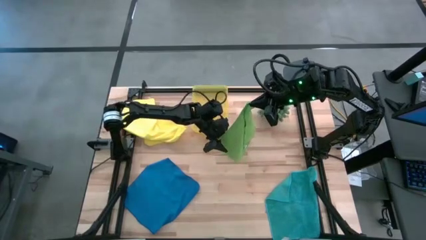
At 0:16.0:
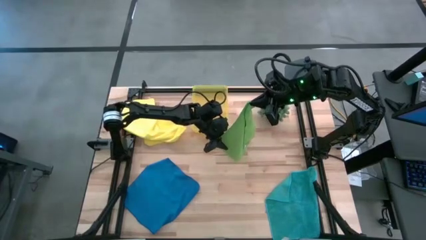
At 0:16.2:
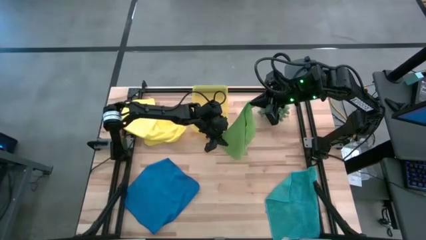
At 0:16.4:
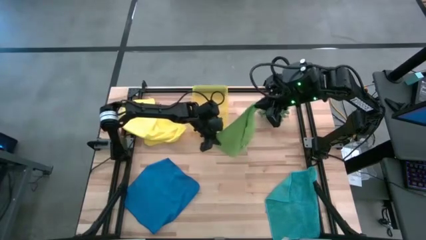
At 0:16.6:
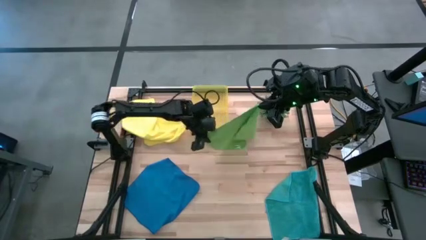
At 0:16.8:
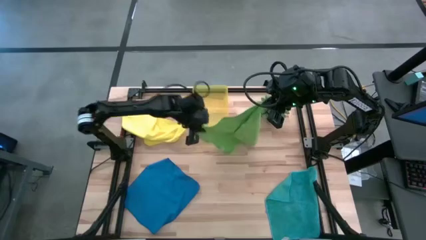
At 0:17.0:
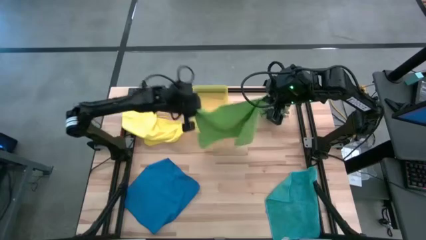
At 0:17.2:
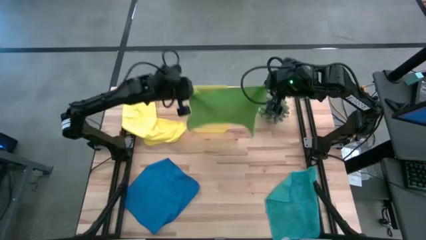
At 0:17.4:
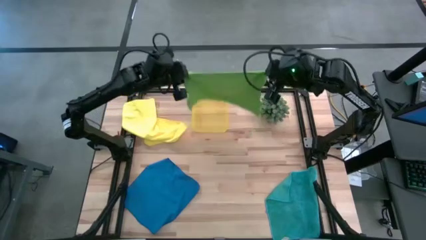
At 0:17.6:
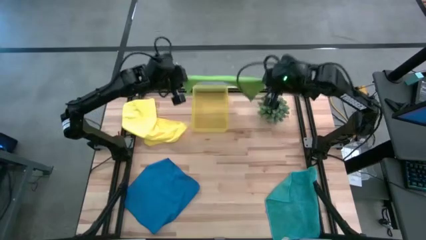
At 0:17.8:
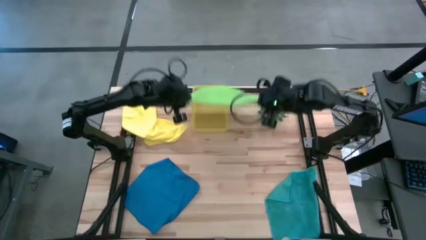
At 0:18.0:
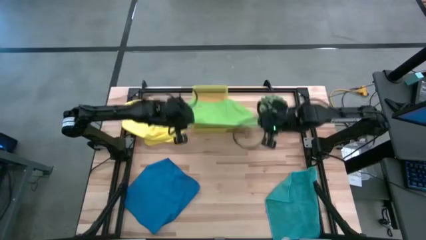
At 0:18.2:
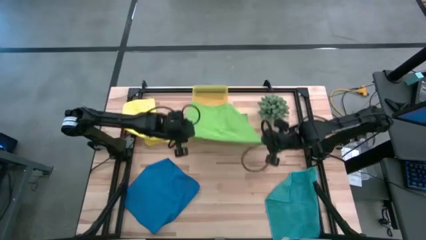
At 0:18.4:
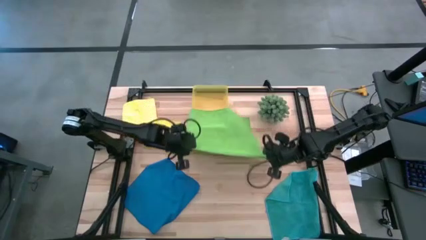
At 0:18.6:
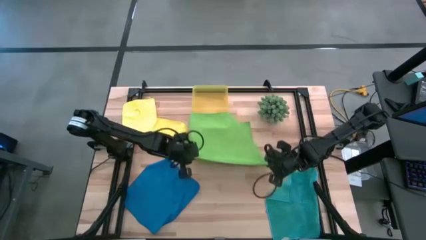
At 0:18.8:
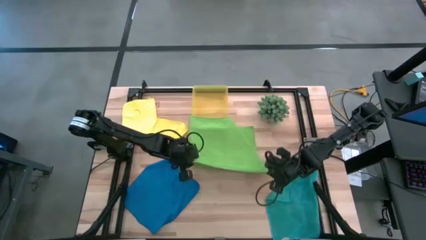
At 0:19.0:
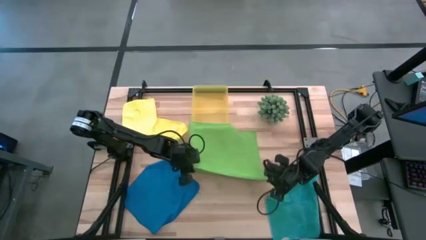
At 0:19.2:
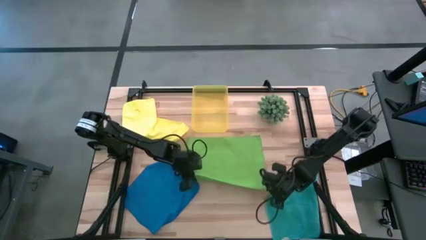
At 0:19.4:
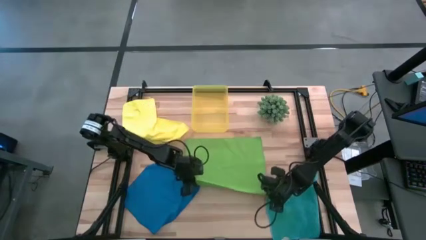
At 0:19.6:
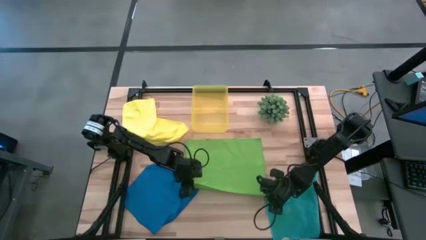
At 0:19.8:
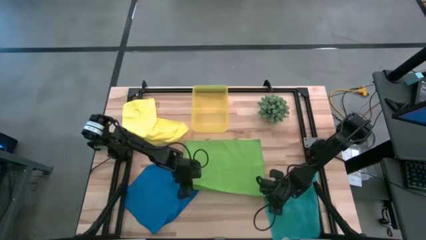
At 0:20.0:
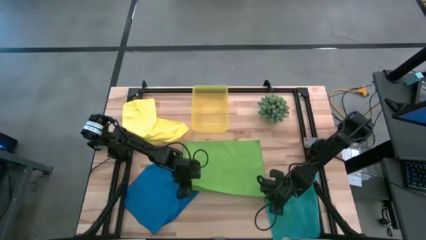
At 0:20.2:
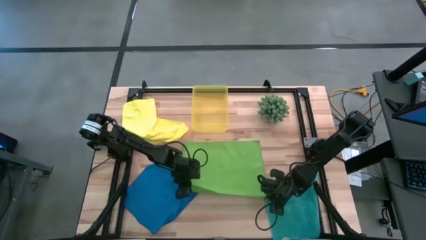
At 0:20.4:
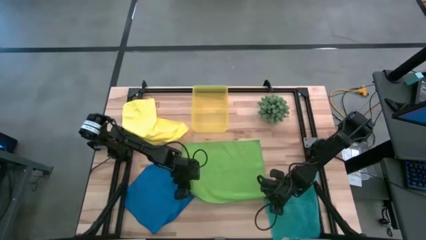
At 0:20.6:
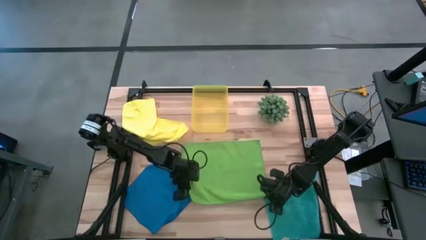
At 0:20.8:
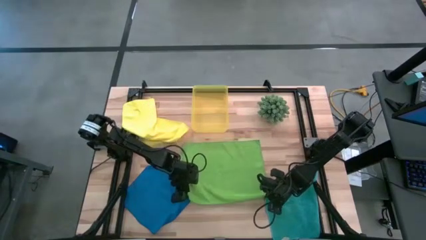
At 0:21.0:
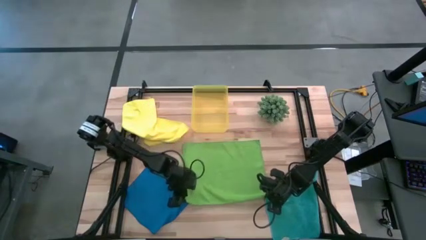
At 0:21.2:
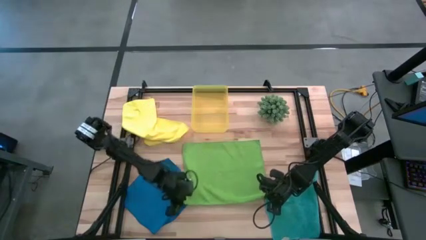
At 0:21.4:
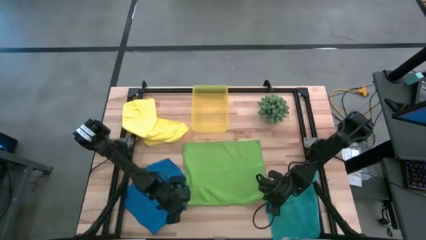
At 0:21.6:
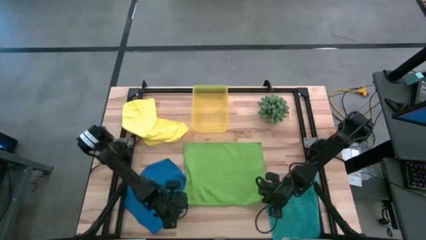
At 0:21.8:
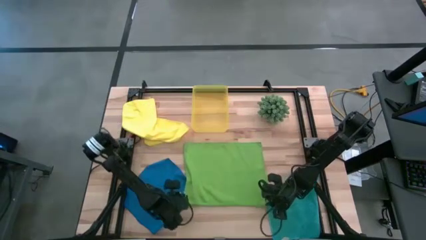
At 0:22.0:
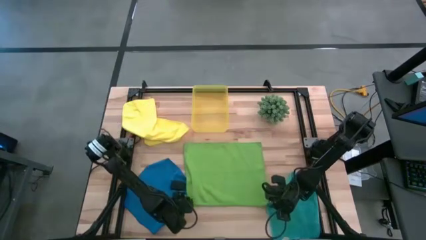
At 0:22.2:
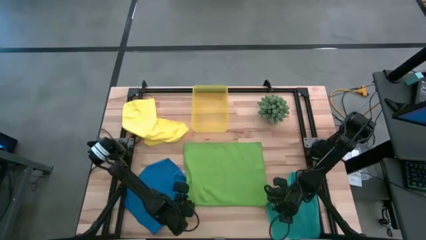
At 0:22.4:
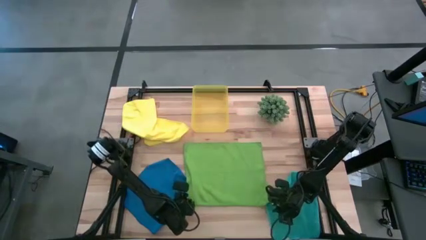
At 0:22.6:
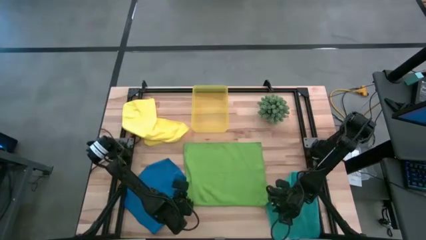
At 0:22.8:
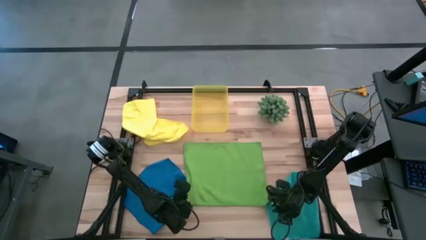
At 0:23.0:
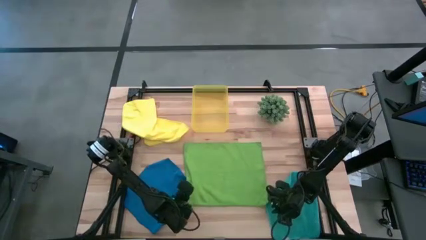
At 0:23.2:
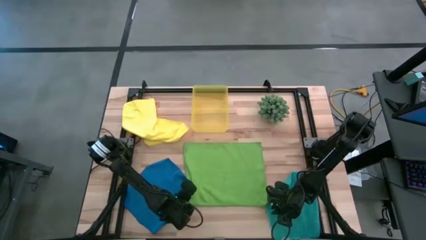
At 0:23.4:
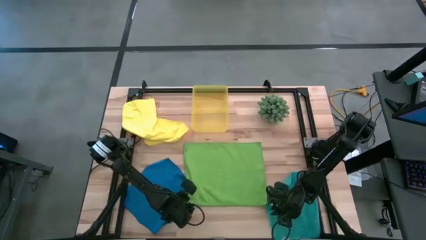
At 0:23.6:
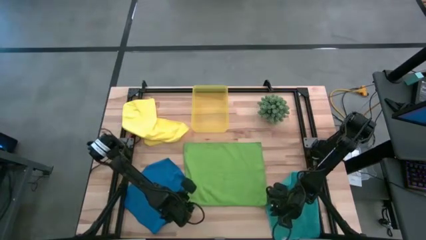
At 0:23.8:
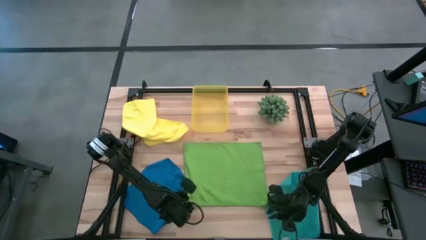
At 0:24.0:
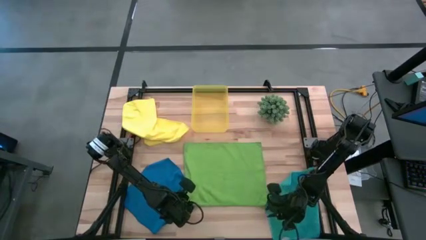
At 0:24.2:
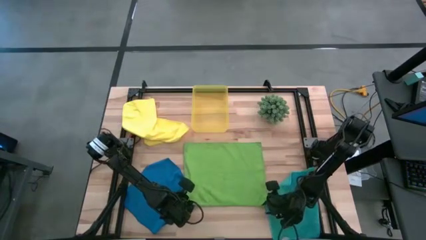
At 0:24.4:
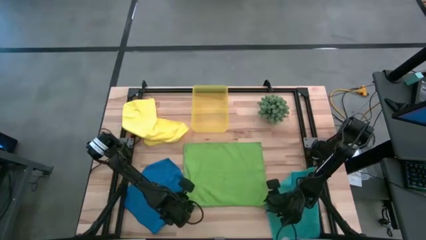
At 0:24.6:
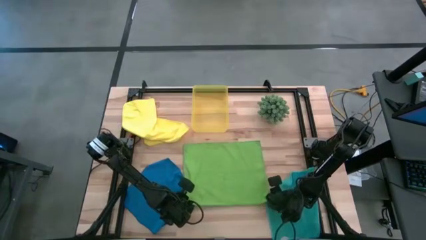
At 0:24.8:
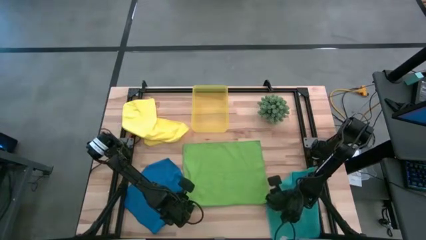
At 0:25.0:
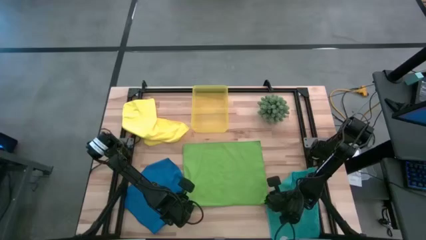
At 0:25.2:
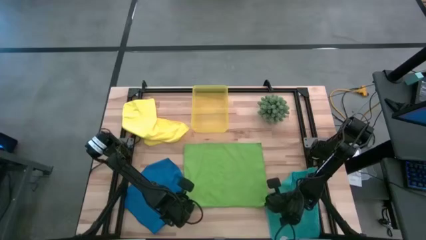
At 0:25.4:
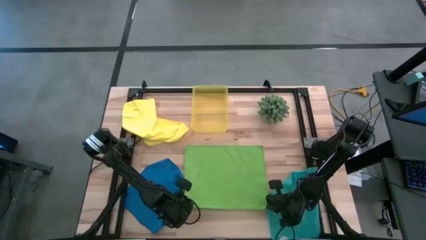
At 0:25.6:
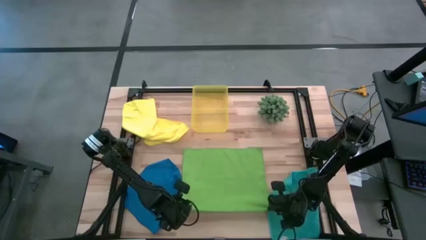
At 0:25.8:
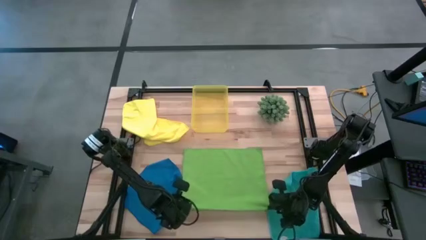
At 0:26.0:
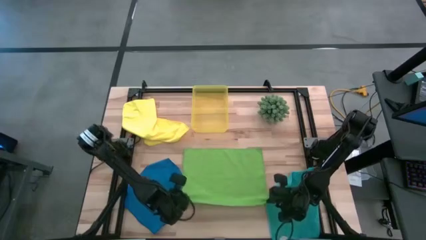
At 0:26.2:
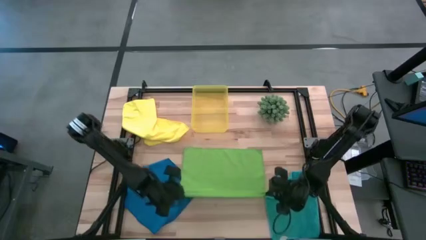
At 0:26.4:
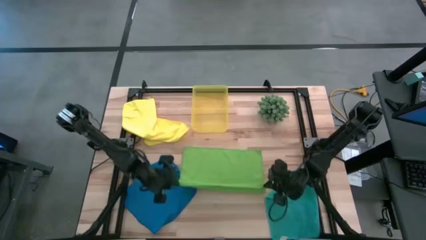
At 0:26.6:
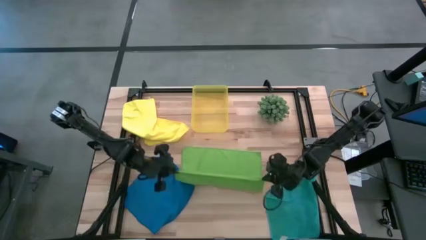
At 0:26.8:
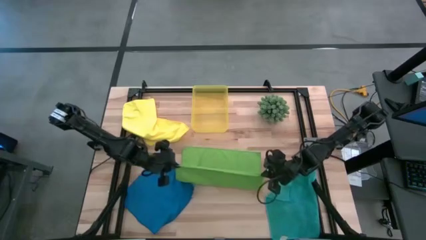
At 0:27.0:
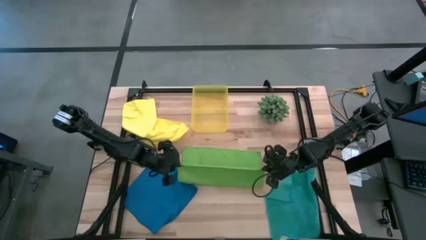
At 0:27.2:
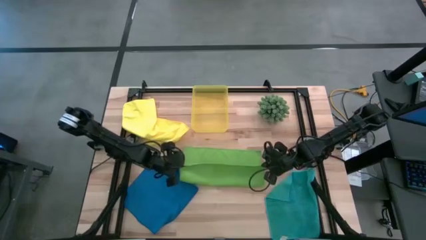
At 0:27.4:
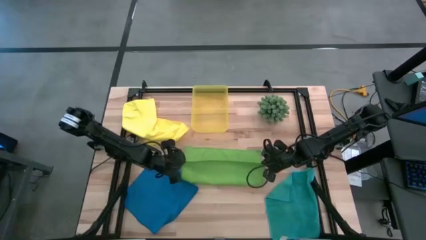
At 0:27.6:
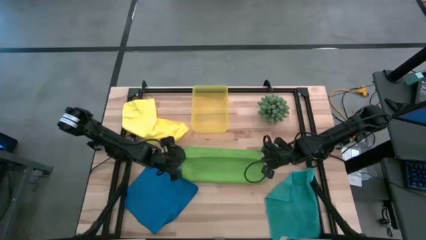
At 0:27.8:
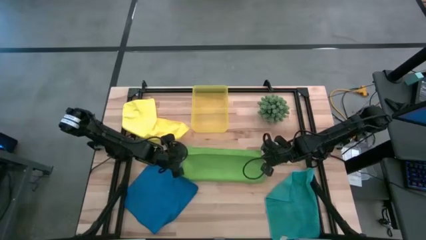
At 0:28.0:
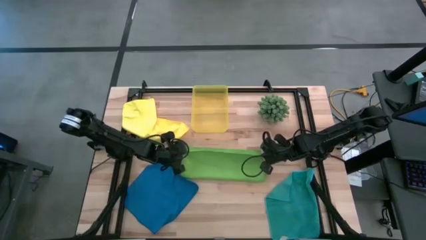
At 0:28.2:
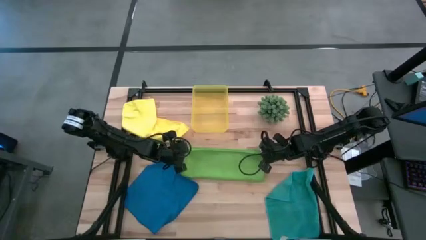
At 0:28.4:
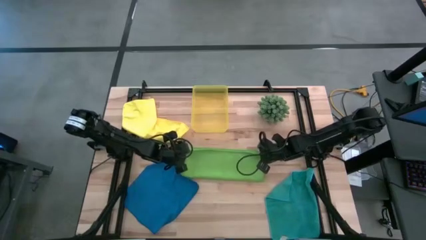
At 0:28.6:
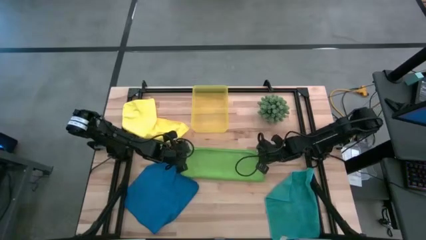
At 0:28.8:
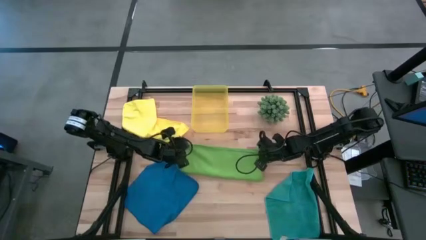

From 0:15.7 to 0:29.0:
Task: Fold microfiber towels
Fold the green microfiber cloth

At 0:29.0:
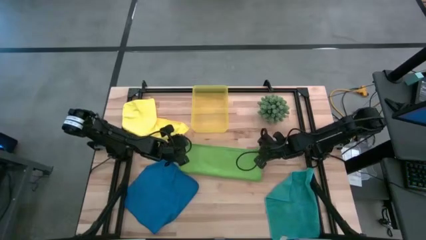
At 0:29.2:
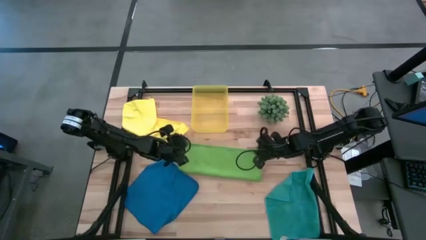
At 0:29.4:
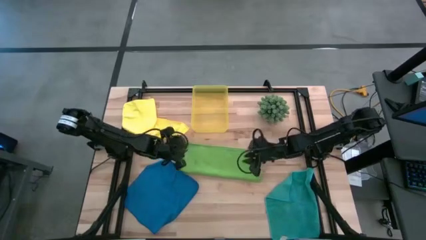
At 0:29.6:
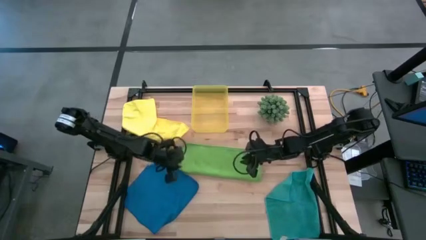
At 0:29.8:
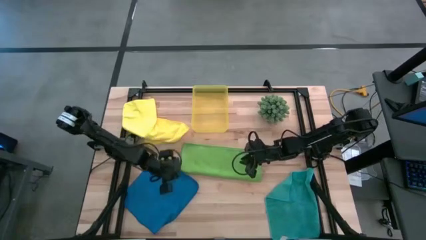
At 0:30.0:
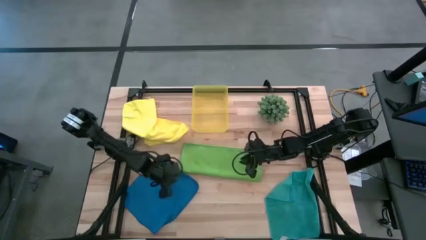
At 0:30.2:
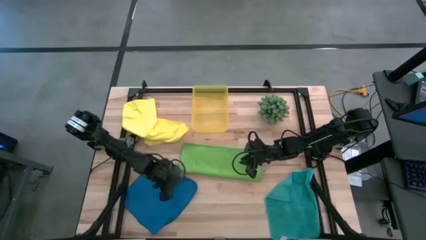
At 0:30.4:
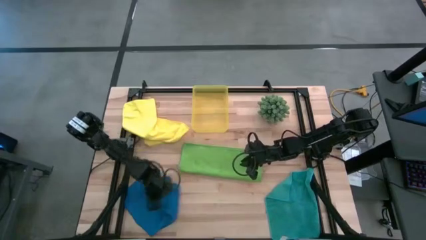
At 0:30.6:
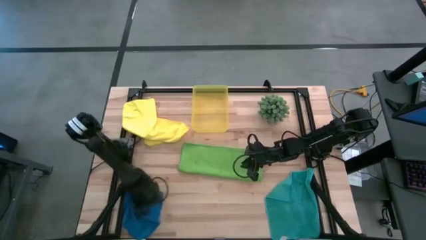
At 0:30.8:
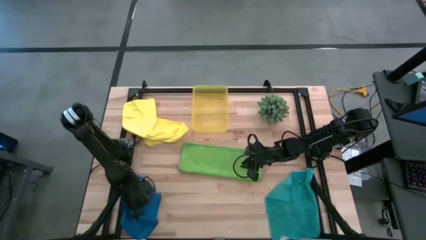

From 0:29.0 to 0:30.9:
Adjust the blue microfiber cloth

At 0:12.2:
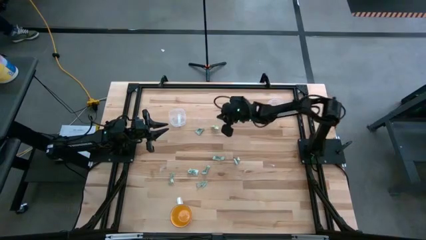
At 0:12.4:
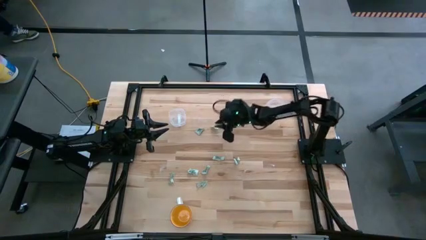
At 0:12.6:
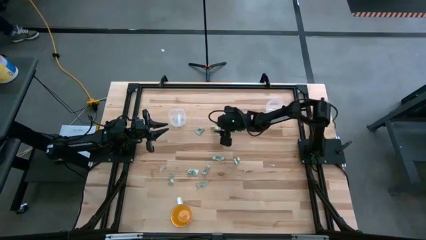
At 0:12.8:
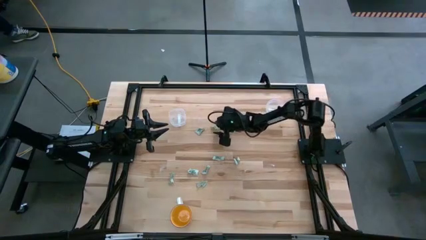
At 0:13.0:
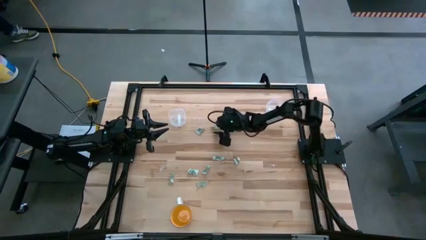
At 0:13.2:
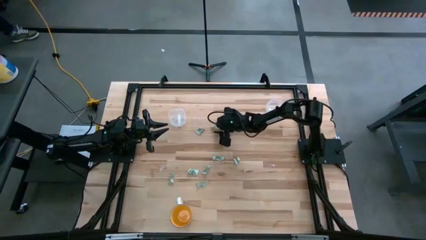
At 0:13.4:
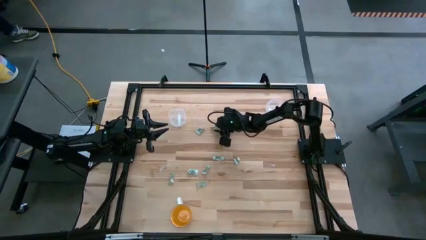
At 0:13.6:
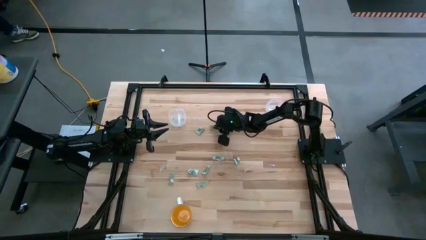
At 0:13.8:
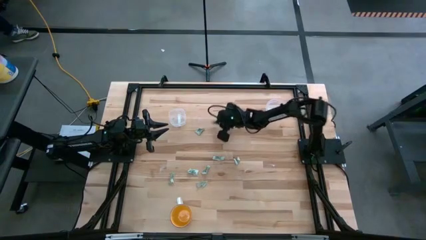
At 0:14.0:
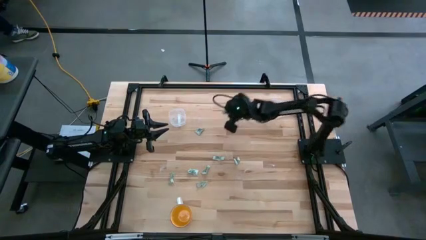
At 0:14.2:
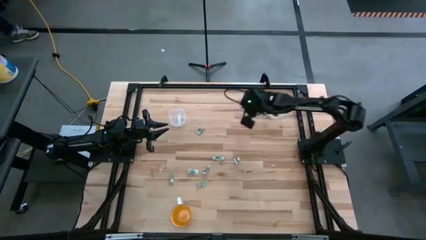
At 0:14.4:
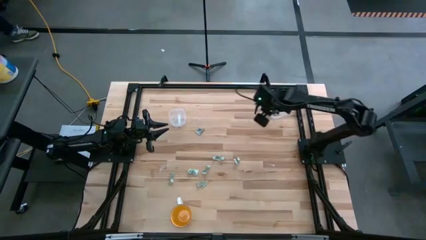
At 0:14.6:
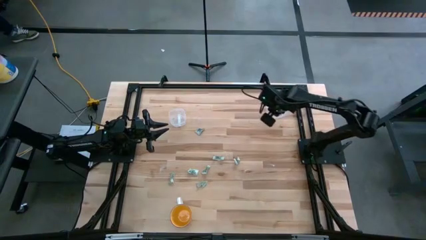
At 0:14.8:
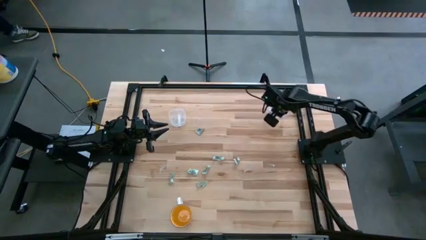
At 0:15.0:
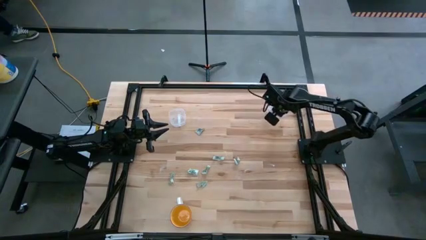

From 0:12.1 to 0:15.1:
Task: Pick and place items into bin
Put the stevia packet into the right transparent bin
